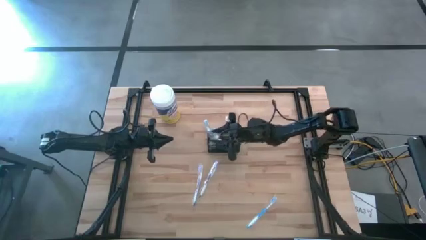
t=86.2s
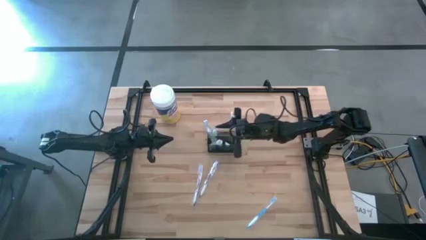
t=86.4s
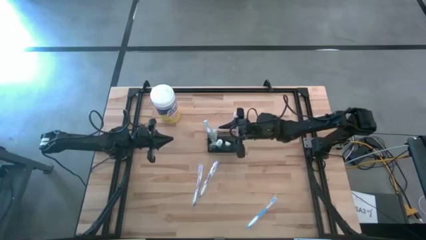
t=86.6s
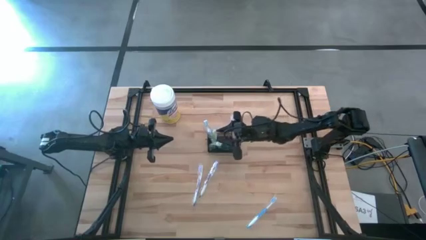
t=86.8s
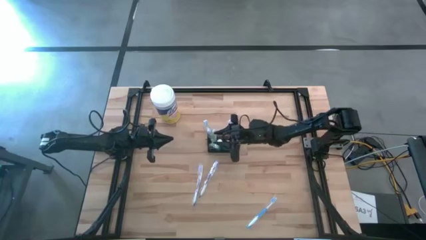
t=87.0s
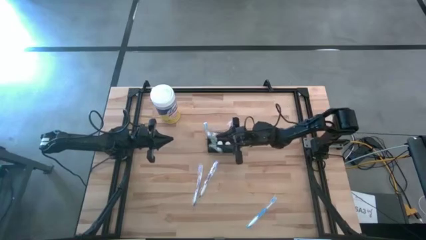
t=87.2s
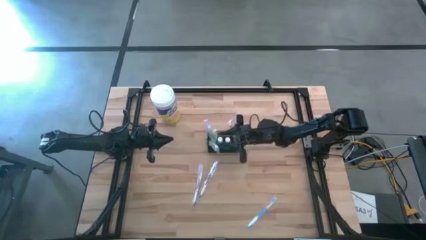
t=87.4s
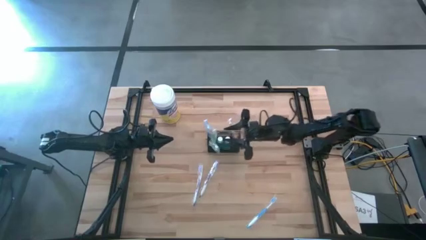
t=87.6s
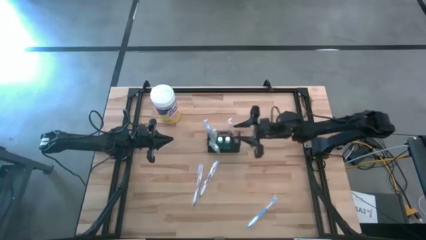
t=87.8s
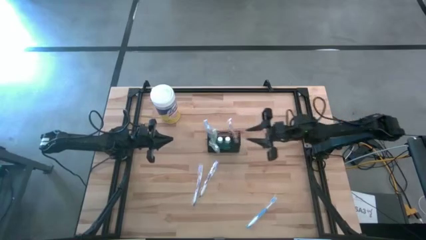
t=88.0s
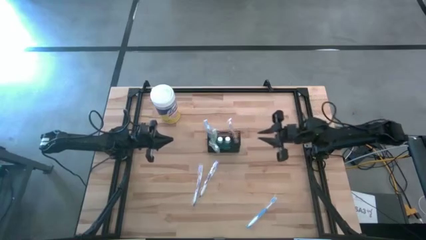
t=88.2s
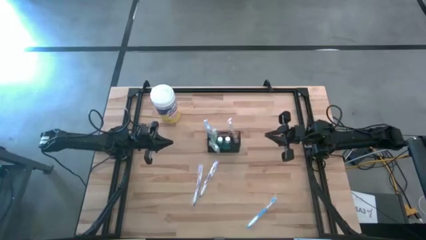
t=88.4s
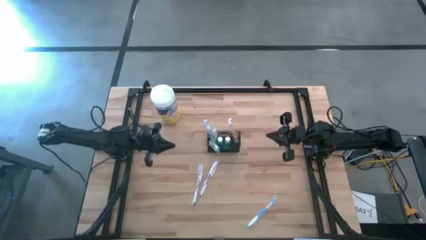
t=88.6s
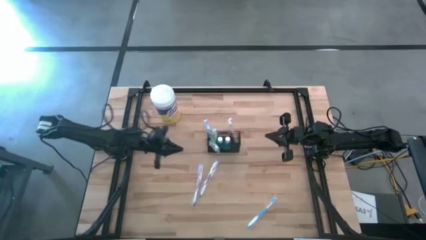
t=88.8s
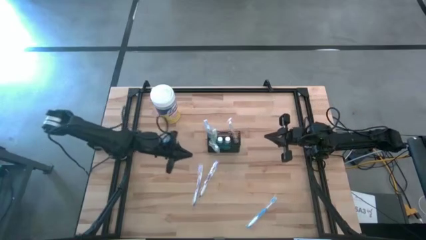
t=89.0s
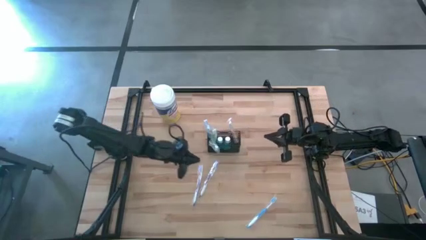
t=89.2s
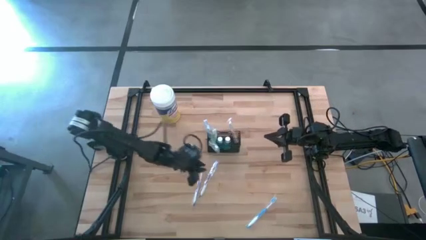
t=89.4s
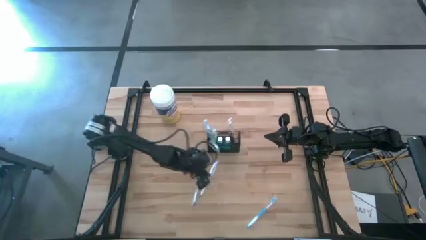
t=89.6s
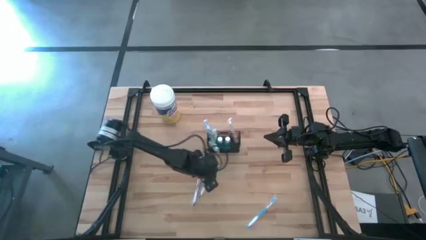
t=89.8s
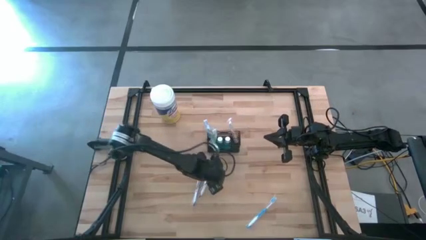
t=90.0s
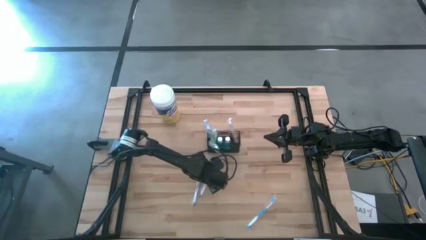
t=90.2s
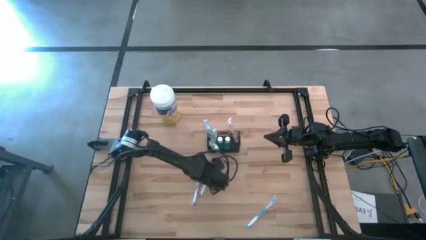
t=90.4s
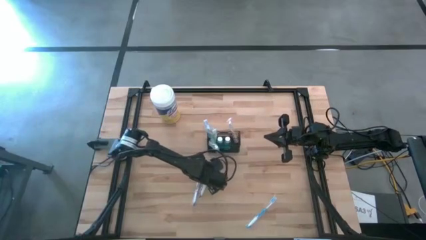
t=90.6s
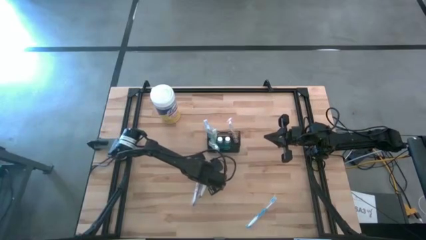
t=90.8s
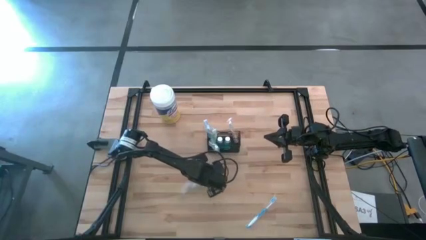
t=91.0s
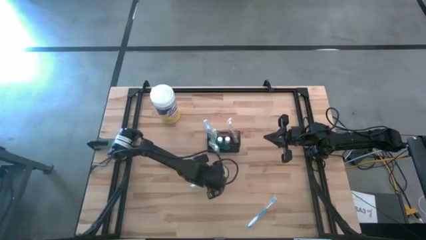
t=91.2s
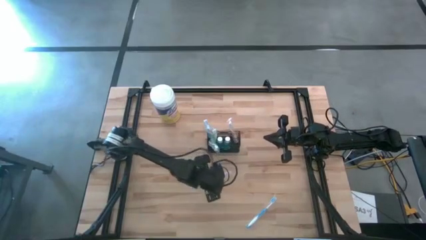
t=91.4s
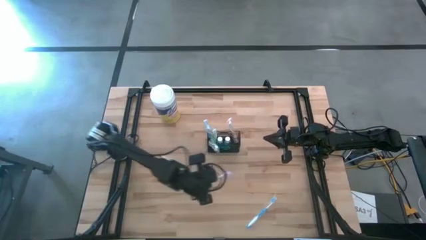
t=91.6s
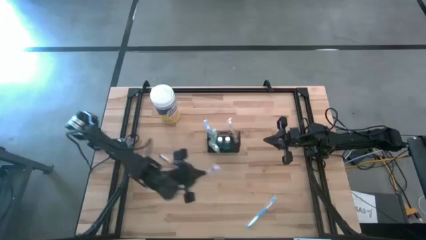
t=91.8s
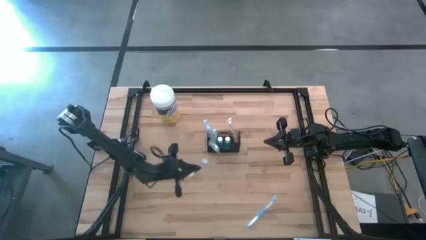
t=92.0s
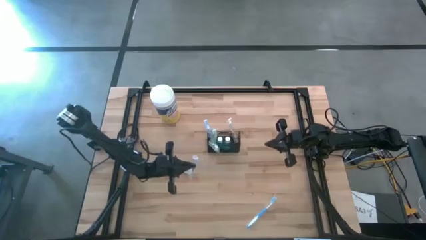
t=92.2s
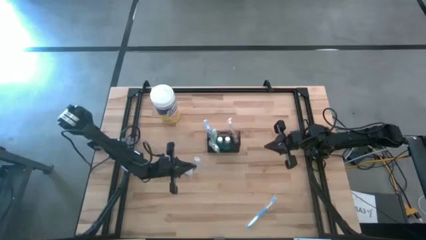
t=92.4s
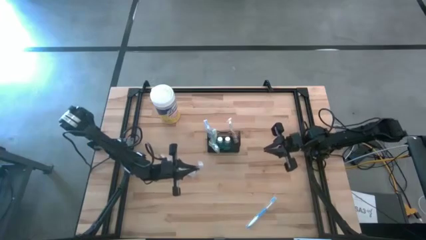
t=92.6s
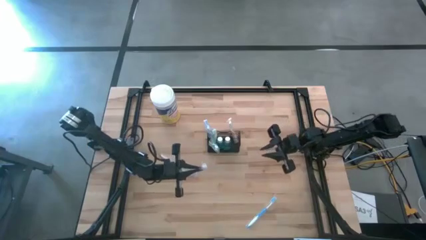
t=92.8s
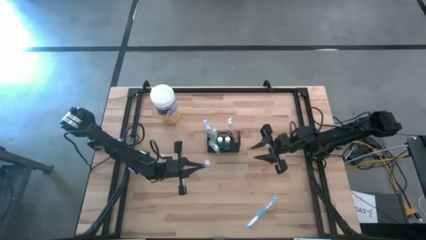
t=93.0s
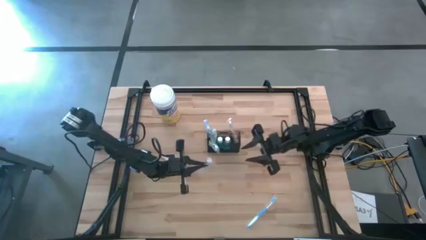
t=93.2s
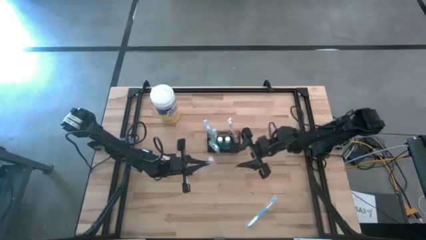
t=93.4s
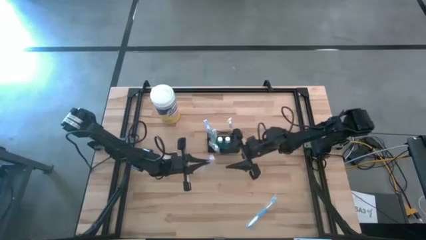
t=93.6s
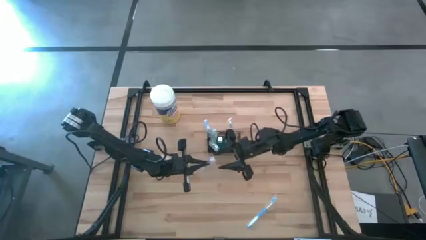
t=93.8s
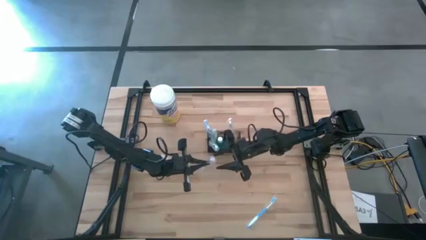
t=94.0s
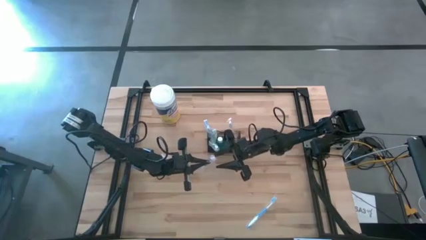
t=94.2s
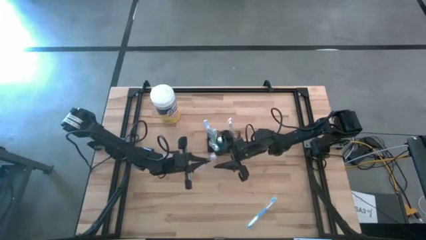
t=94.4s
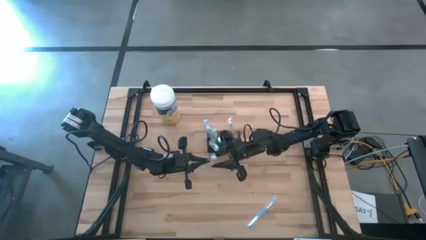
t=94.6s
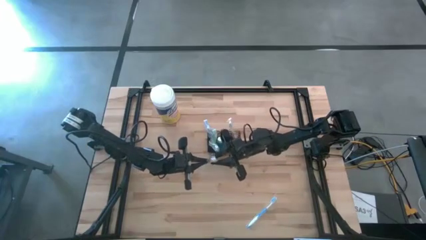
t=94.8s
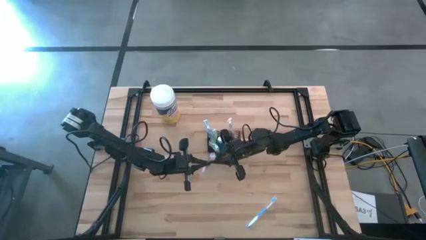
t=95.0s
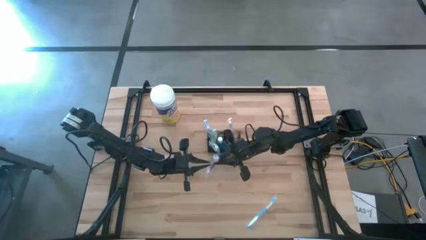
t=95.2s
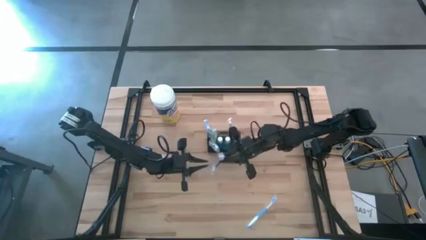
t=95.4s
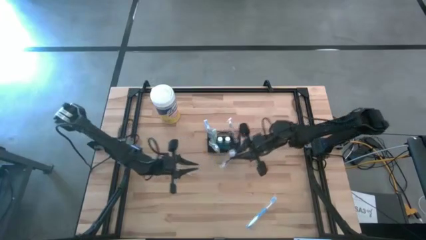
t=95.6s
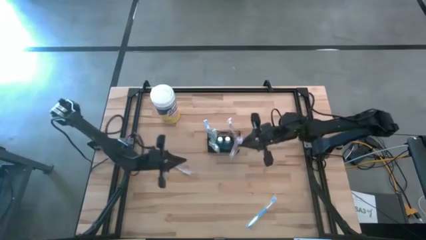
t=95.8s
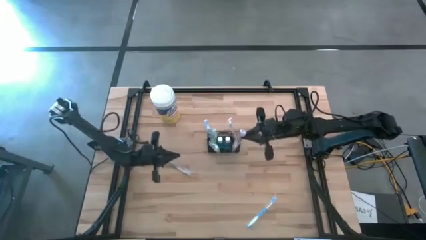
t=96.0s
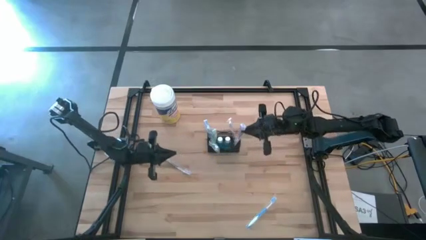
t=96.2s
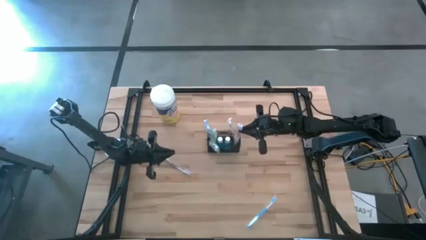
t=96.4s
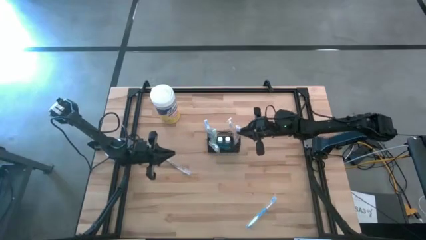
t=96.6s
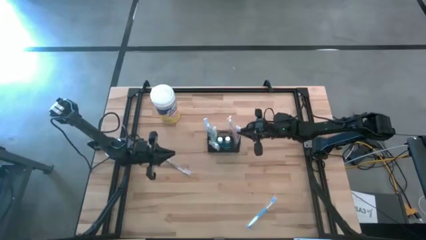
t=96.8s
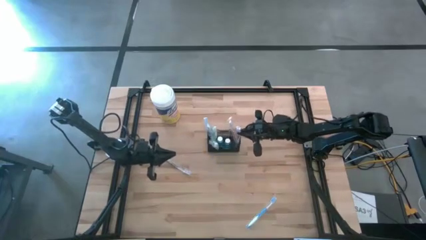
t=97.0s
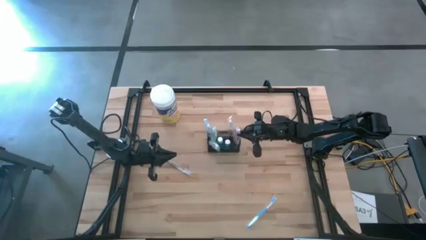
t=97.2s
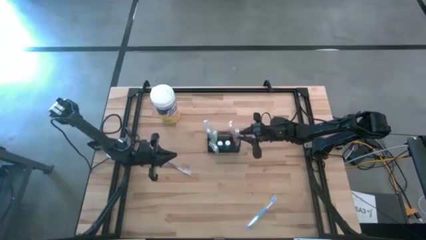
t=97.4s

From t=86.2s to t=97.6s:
Task: Pick & Place toothbrushing station
Put the right violet toothbrush into the black mesh organizer
